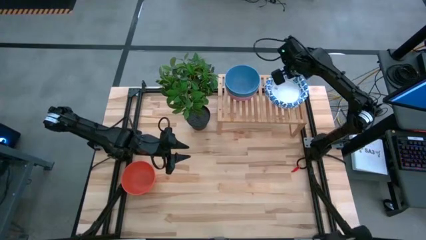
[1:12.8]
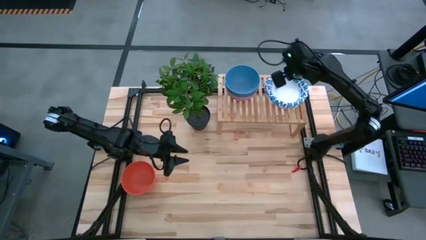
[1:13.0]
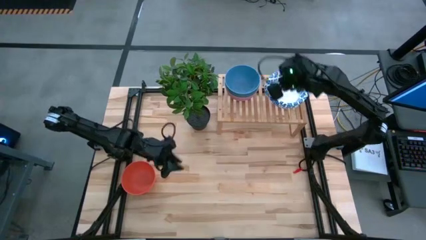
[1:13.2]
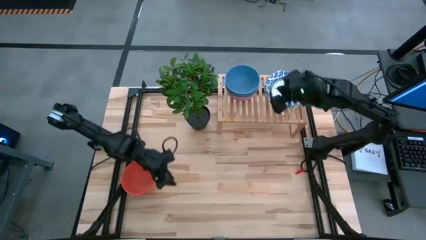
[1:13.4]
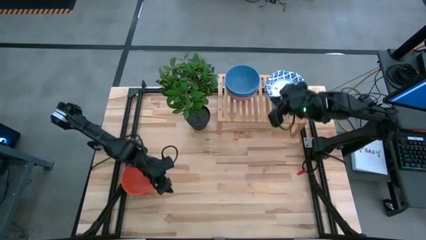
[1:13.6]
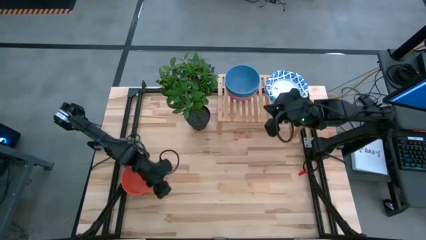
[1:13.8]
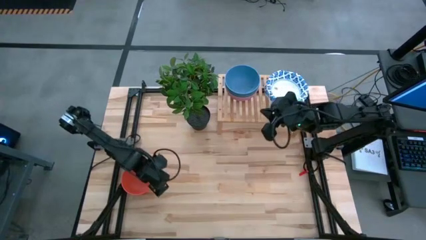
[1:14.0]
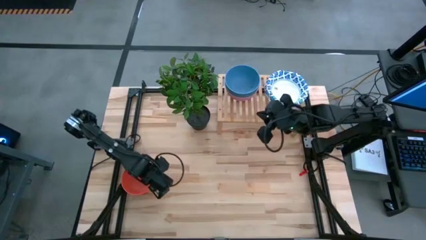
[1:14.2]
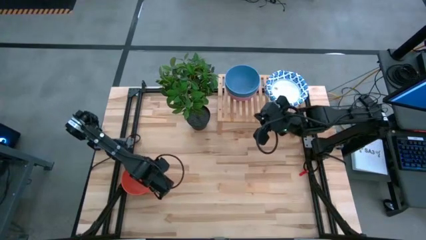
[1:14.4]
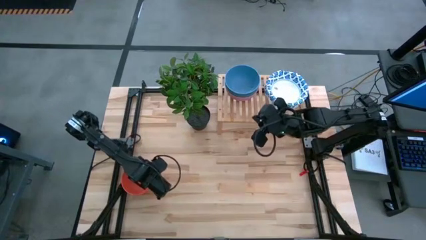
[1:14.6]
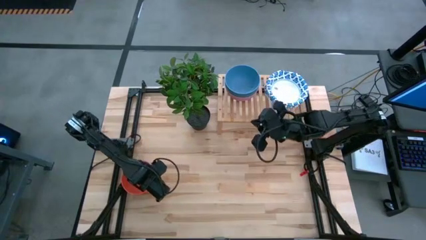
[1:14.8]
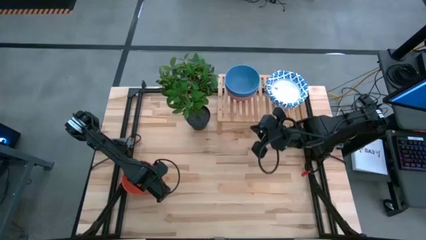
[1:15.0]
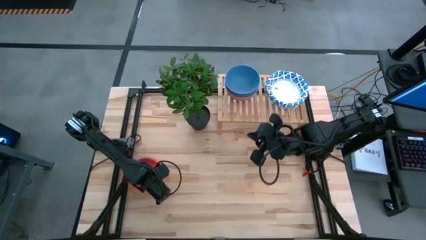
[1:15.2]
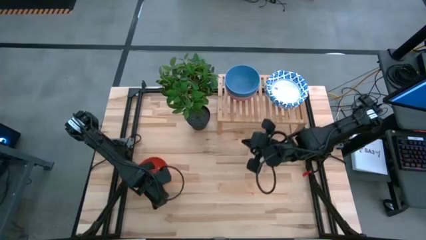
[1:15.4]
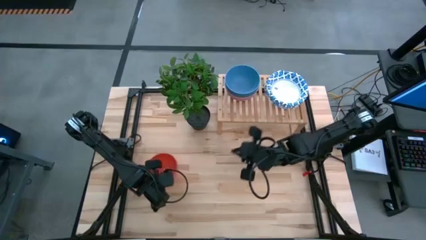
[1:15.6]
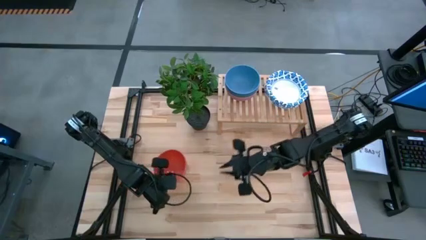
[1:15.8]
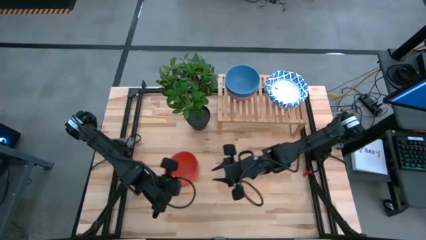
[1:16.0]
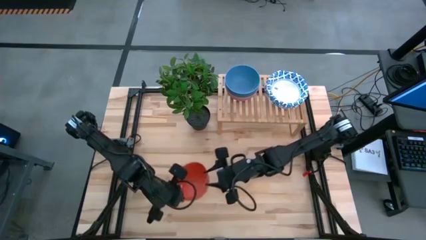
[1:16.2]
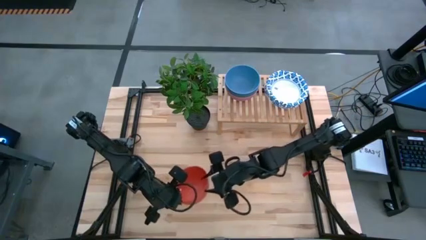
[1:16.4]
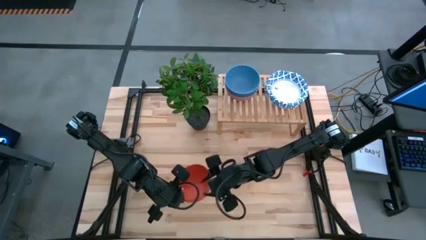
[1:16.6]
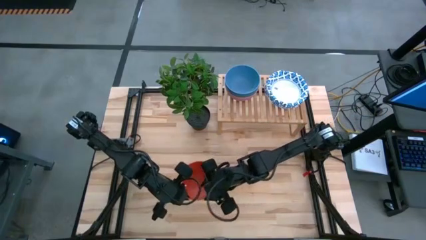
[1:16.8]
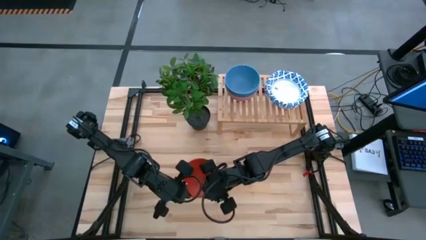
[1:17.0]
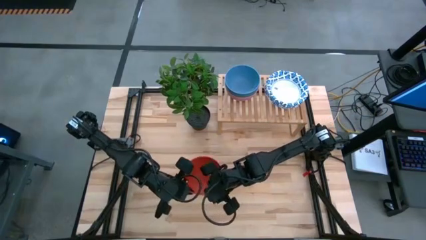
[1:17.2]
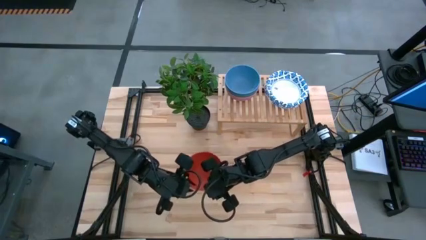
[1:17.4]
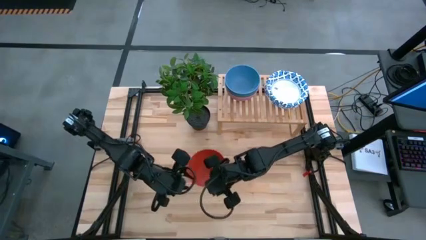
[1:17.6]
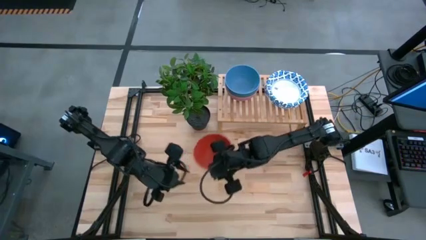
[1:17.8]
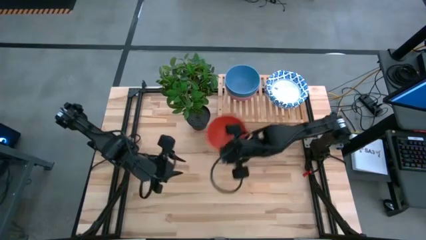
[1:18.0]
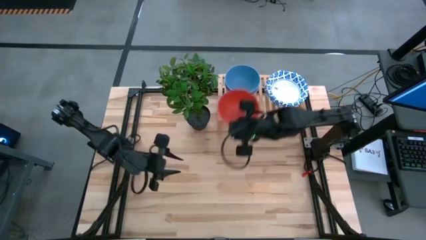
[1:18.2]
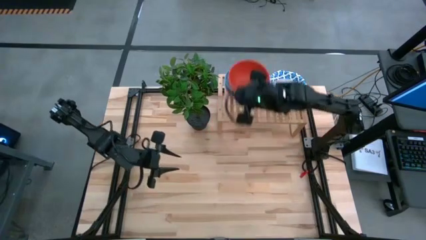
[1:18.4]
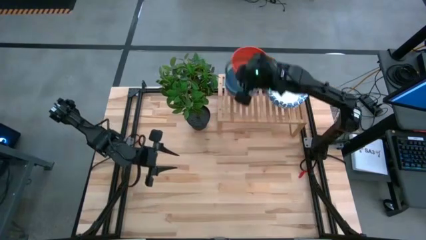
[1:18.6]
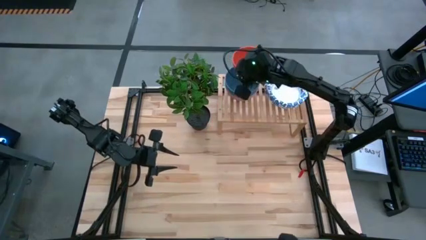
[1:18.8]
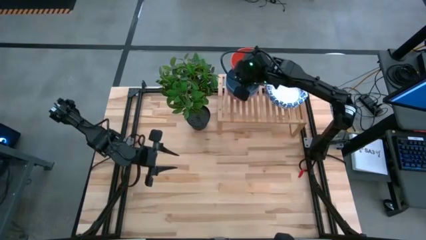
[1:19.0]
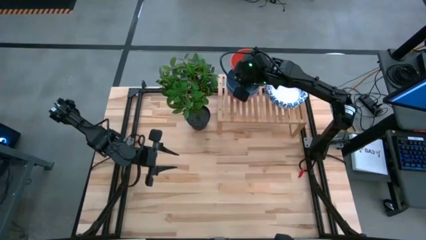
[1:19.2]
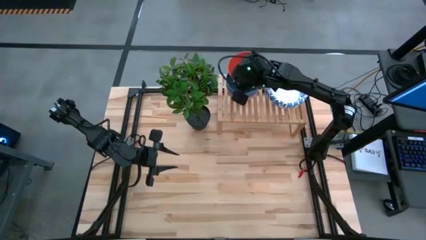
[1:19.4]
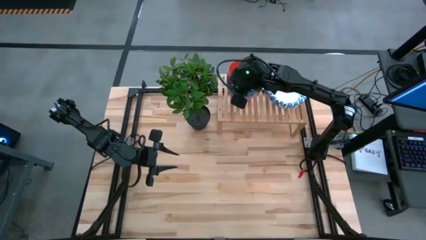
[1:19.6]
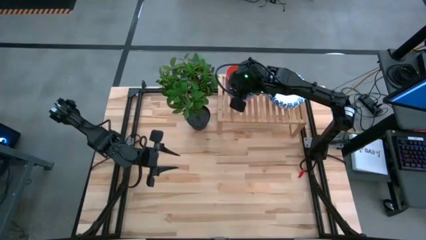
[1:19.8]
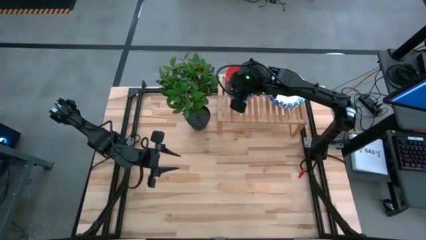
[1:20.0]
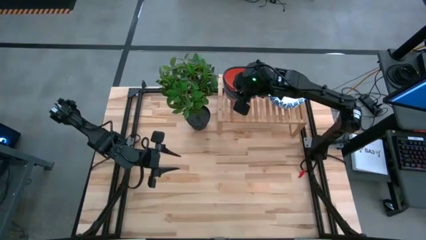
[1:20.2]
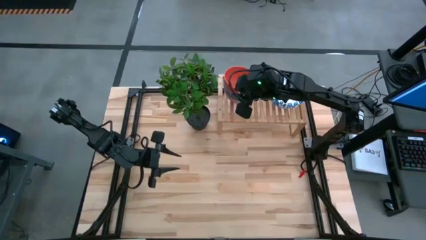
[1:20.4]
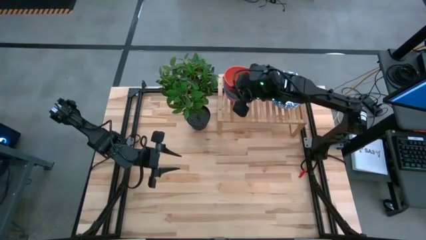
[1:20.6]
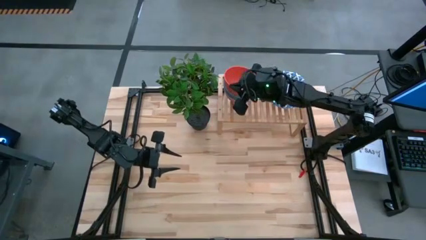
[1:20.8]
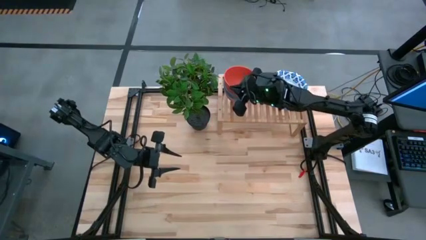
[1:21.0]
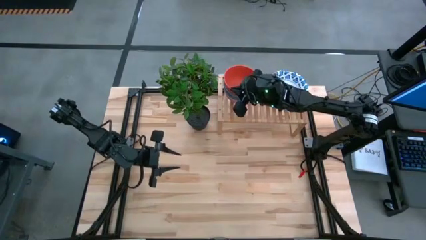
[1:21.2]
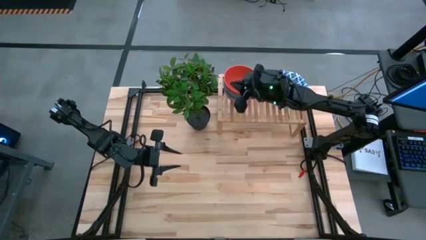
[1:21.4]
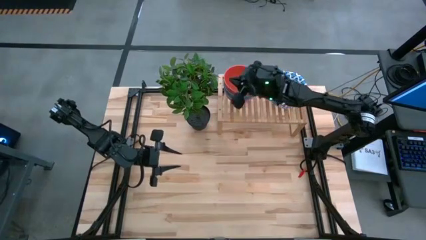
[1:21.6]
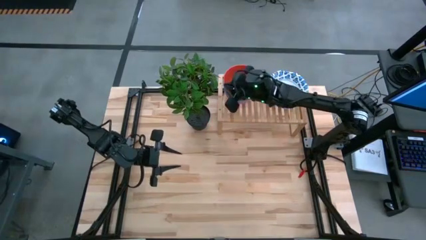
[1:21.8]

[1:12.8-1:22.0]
Task: Place and stack bowls onto a shelf
Stack the orange bowl on top of the blue bowl on the shelf

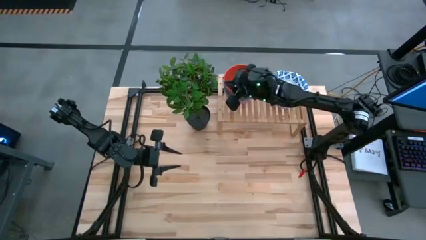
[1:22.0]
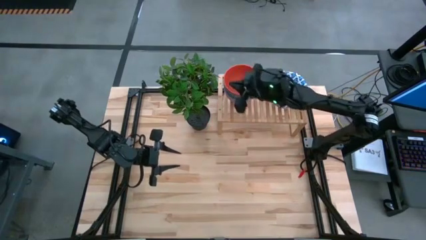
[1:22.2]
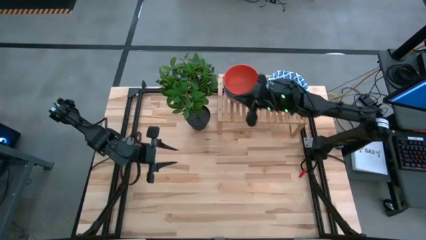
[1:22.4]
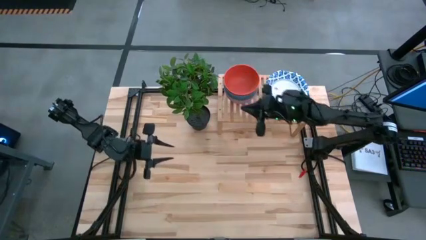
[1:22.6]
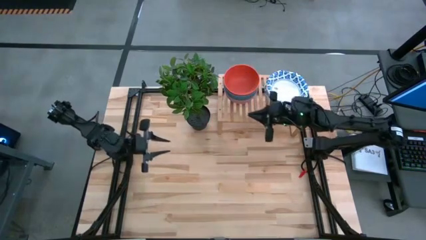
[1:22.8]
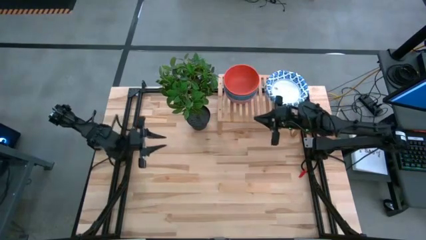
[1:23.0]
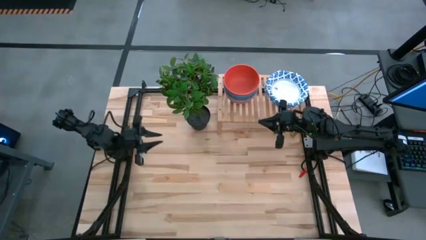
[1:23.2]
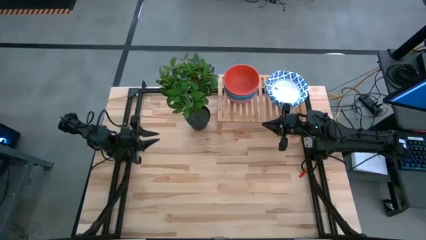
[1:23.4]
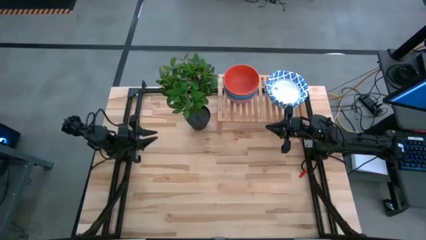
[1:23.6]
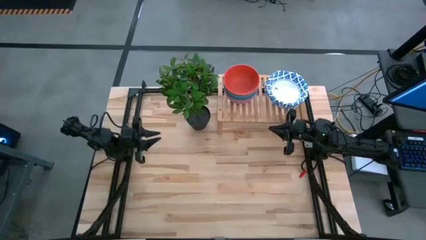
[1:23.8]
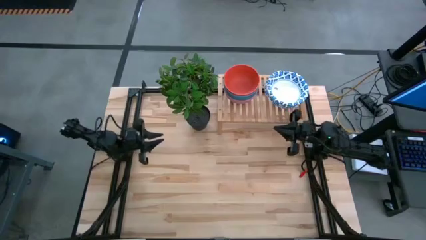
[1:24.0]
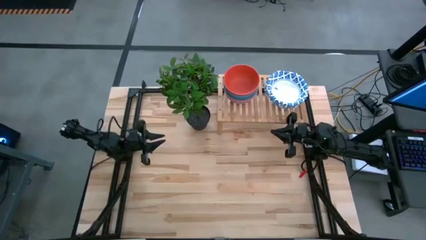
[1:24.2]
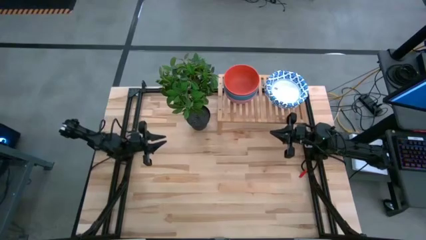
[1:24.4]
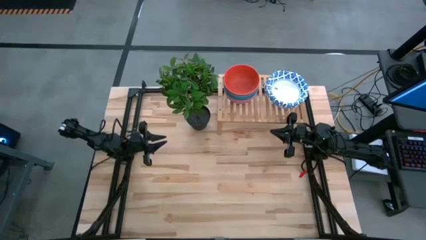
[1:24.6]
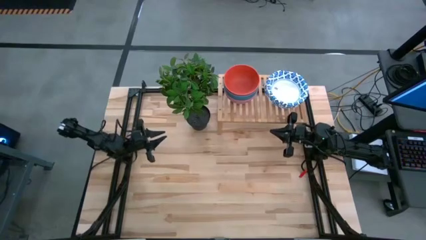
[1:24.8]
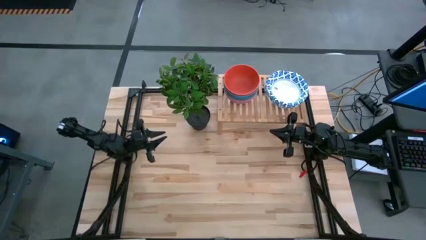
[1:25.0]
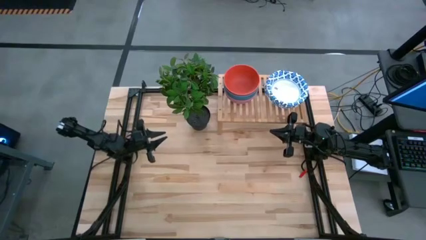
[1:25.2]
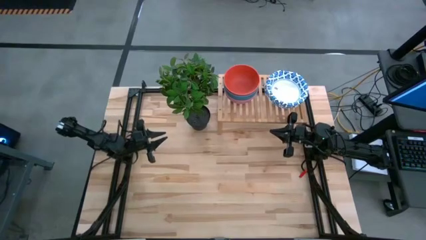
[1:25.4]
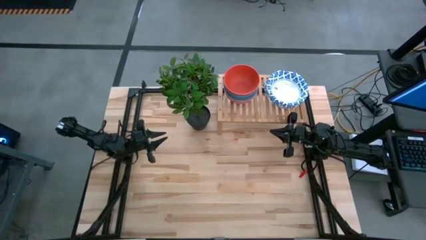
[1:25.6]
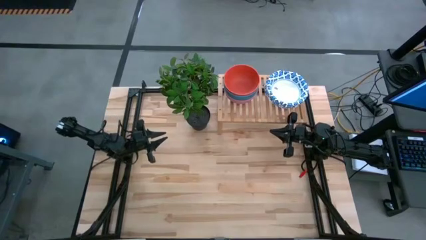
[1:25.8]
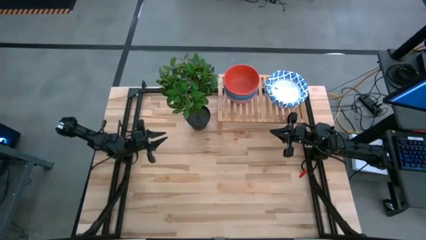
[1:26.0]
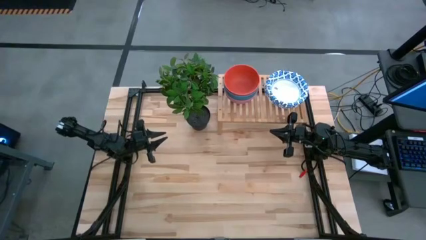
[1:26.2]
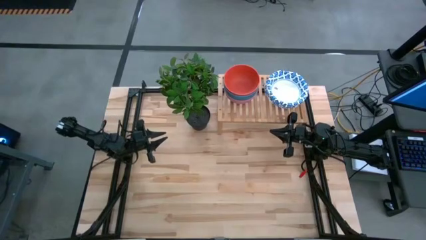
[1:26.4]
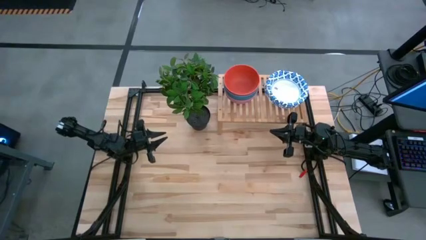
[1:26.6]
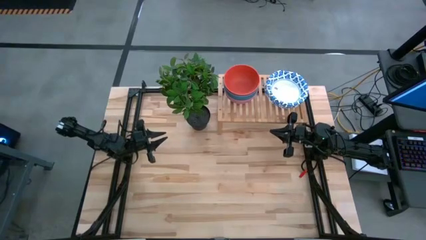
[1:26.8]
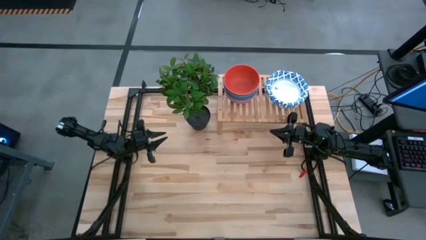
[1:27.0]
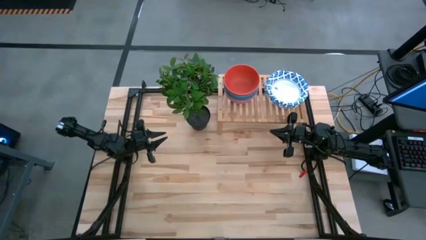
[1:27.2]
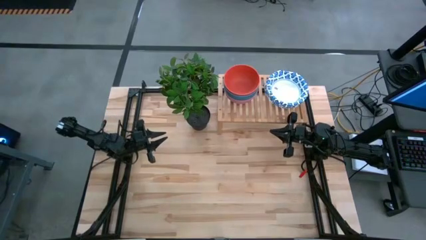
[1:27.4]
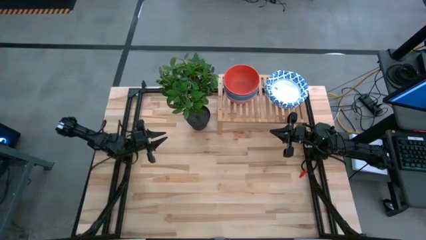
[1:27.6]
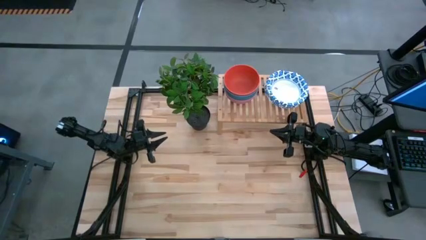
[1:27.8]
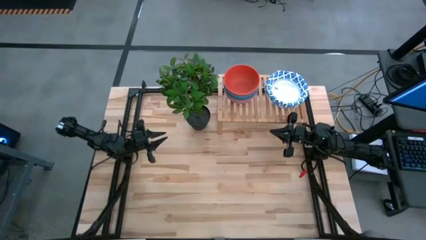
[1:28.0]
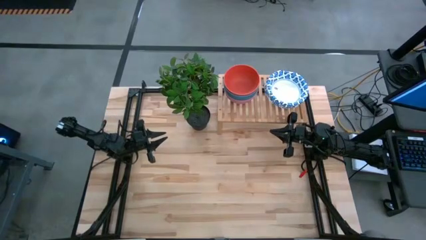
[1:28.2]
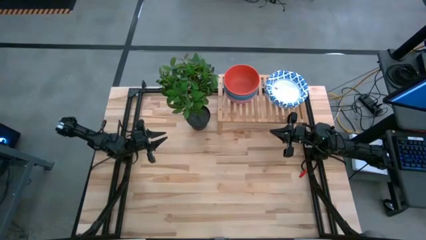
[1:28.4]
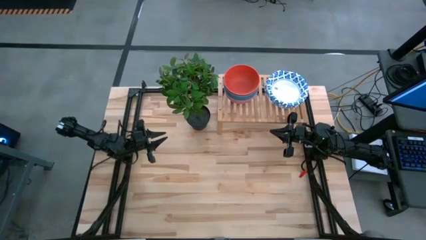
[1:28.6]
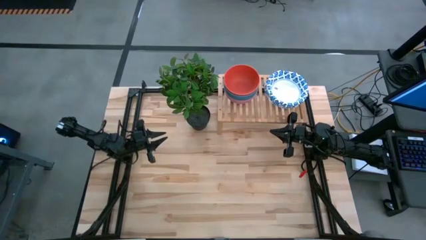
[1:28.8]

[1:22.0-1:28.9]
Return to Home Position

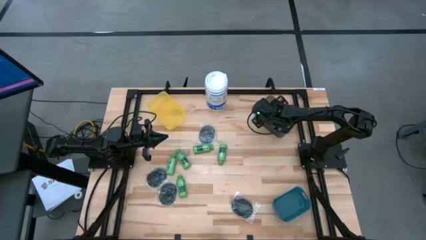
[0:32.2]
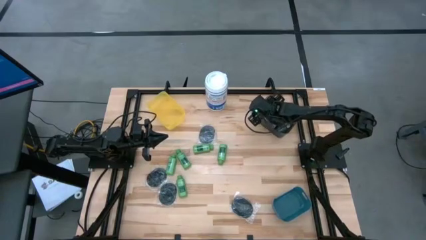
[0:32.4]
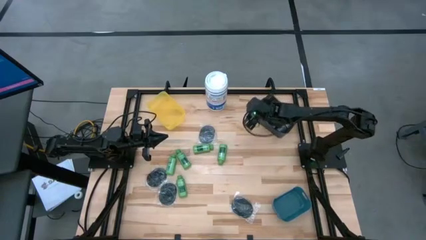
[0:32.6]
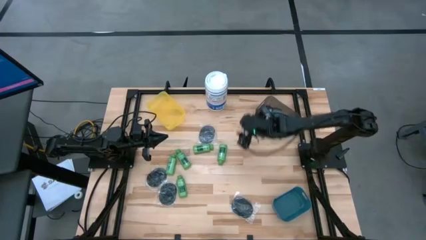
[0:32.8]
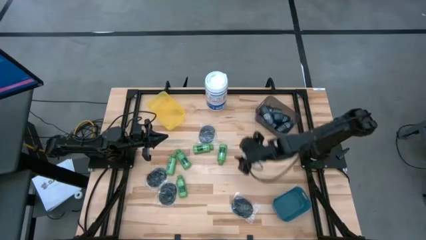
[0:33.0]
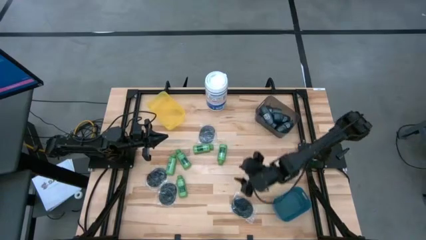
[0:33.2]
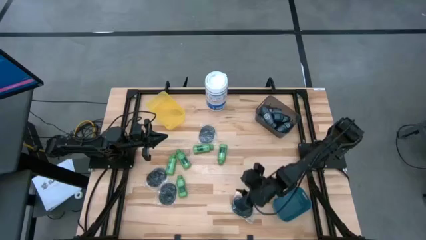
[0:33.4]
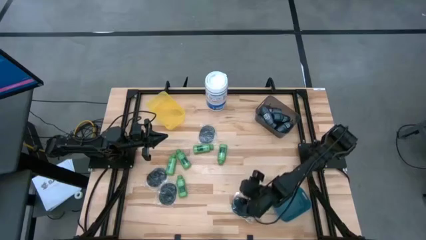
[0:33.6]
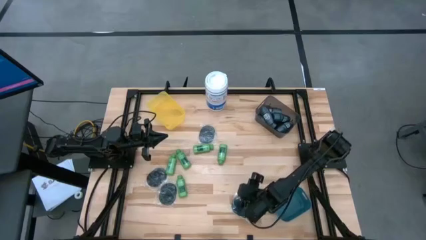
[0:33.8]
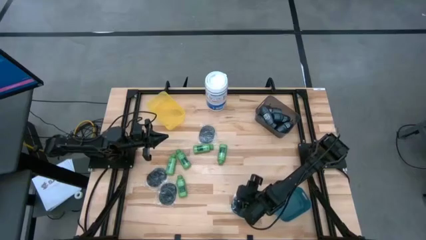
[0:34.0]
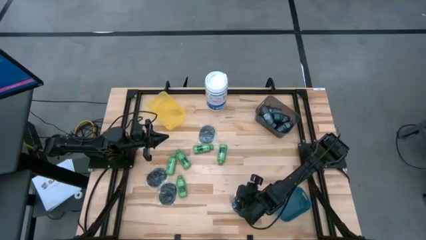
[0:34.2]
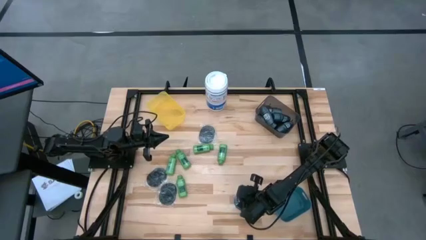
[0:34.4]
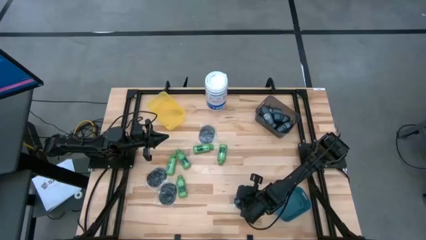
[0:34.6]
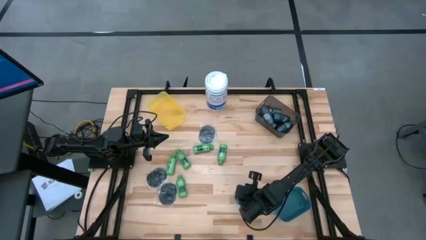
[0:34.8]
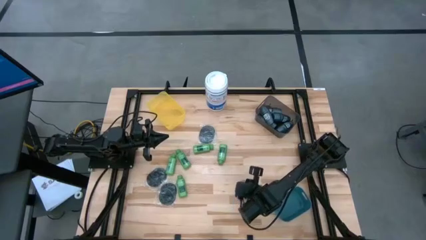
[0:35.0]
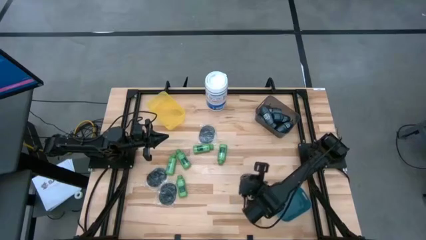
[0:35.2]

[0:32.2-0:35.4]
Task: Pick & Place Travel size toiletries
Put the black hairbrush into the blue bin
